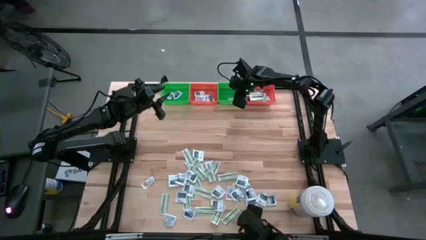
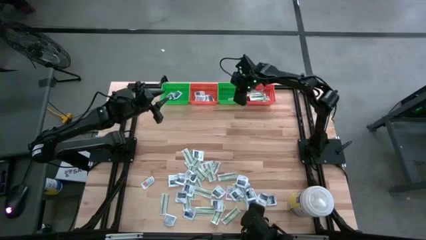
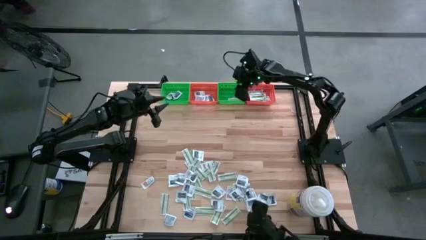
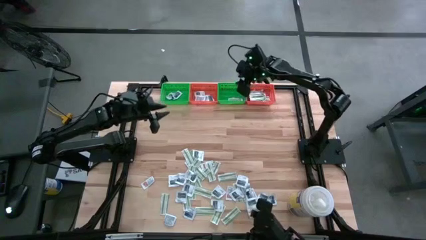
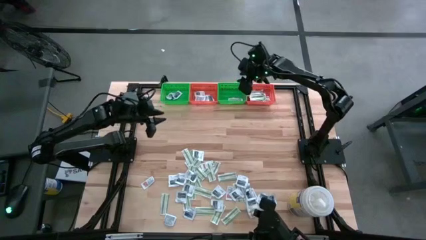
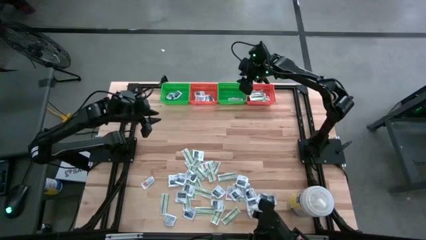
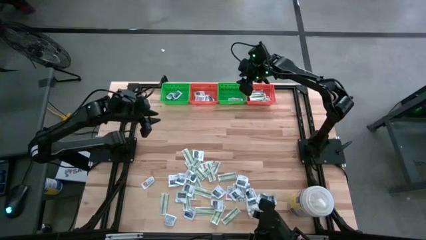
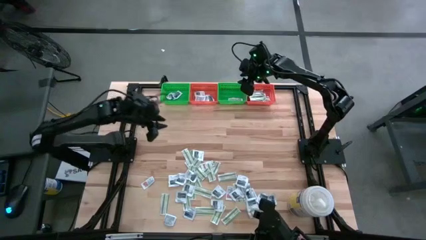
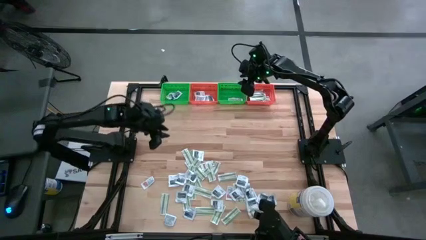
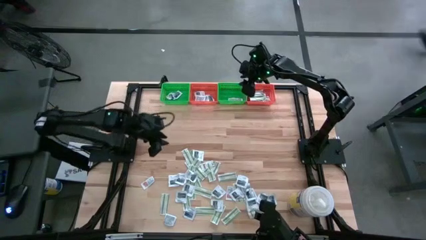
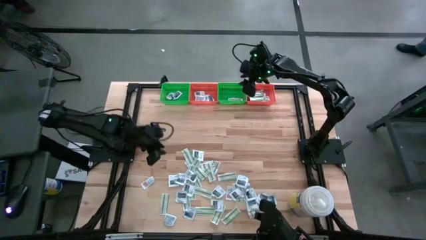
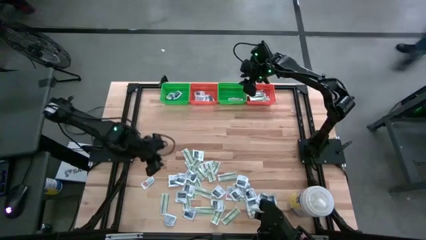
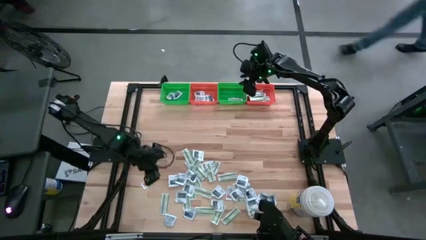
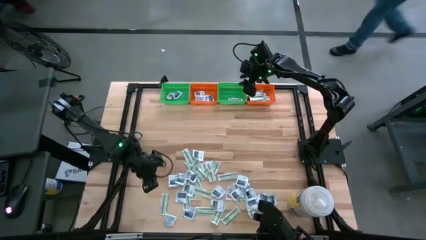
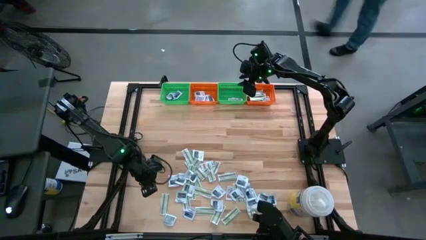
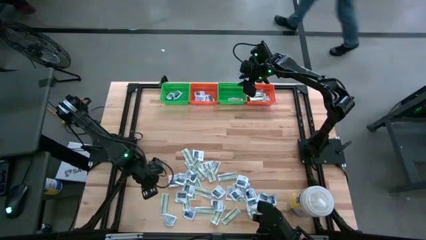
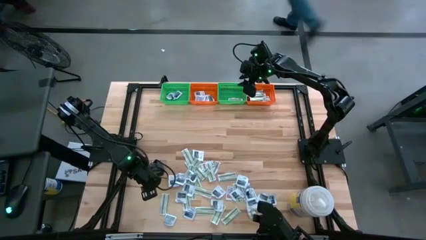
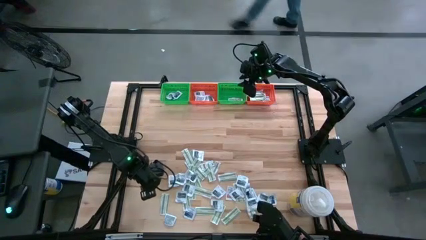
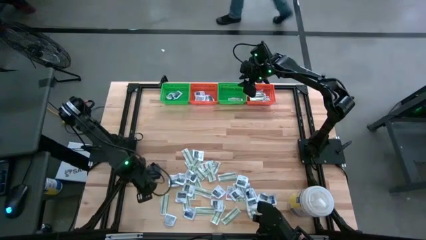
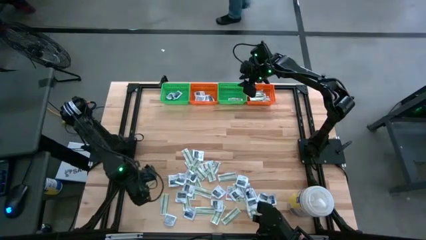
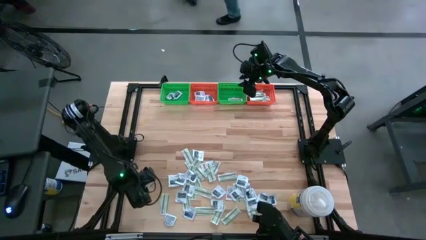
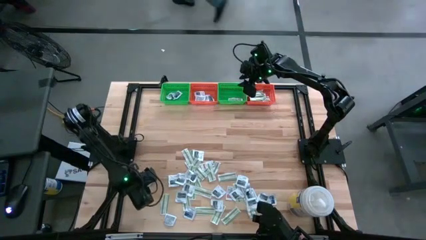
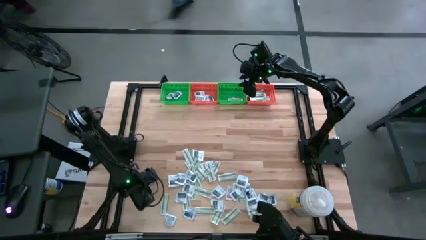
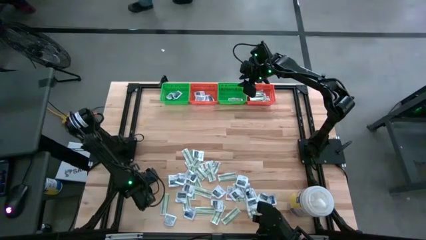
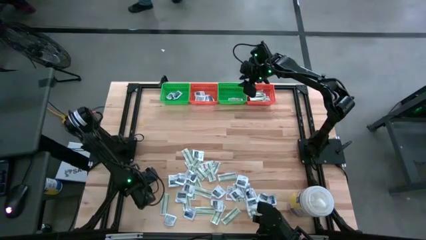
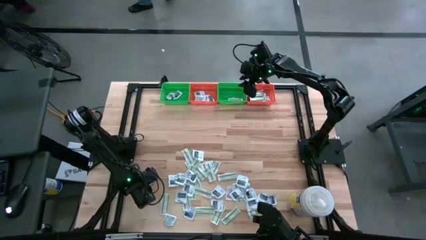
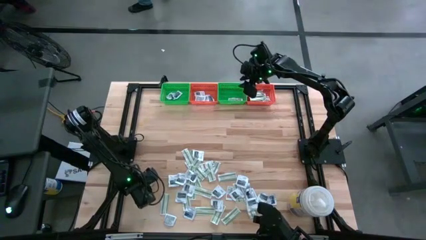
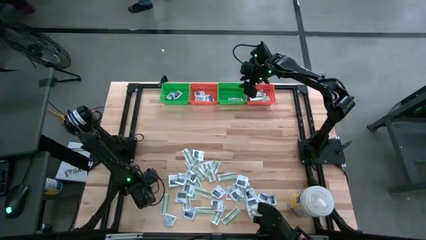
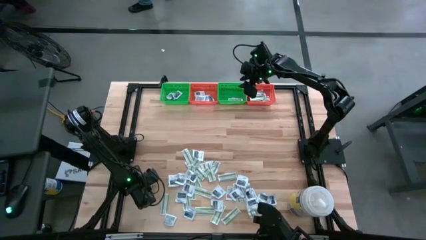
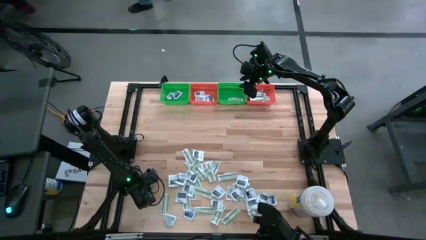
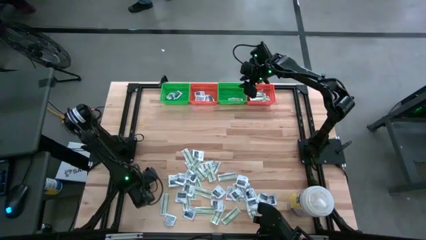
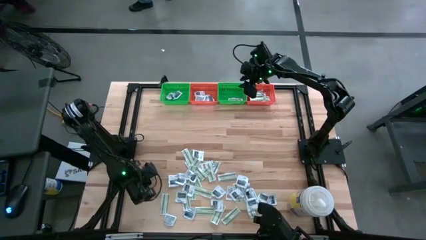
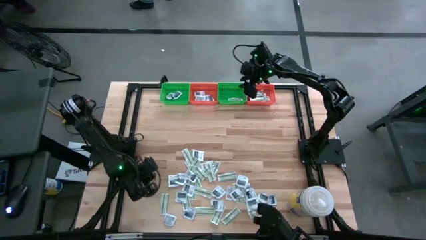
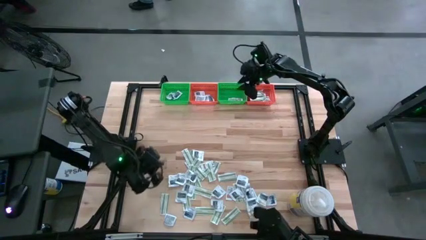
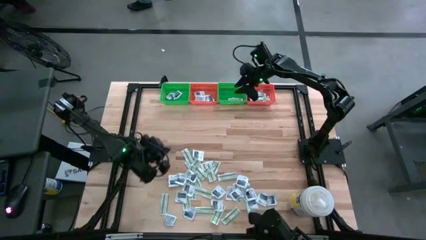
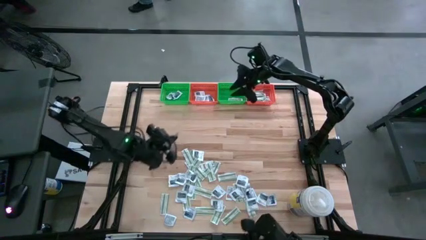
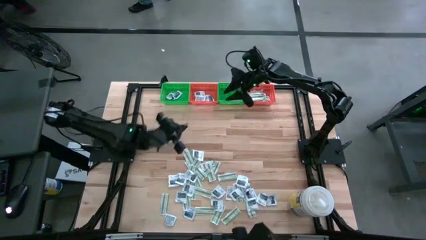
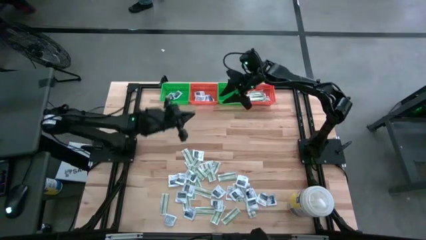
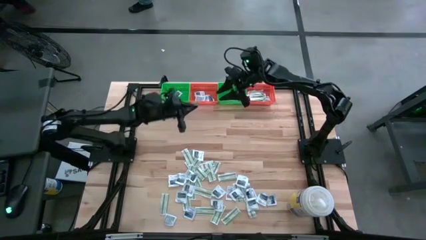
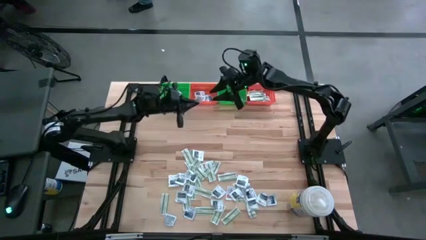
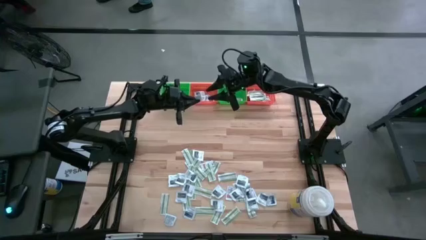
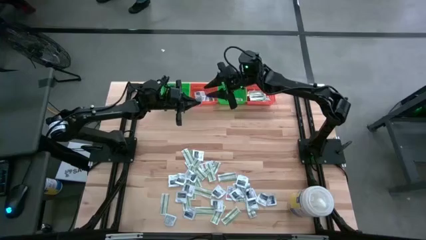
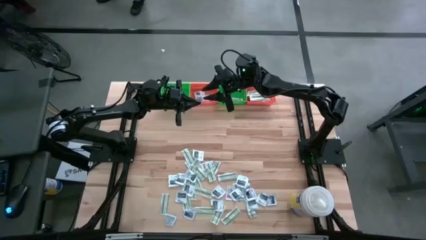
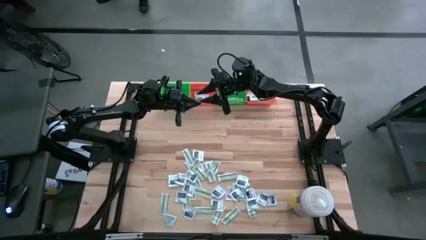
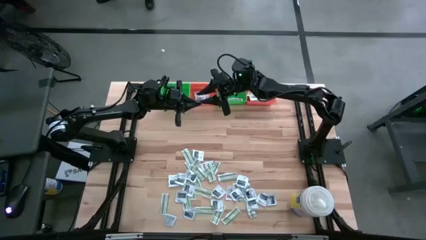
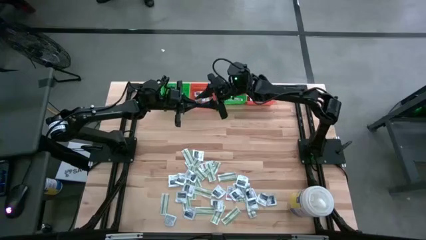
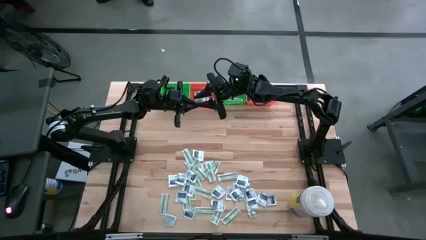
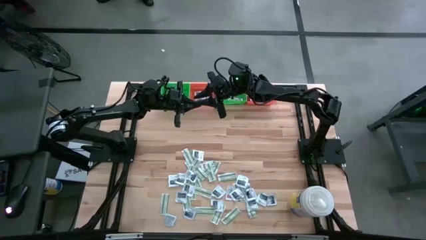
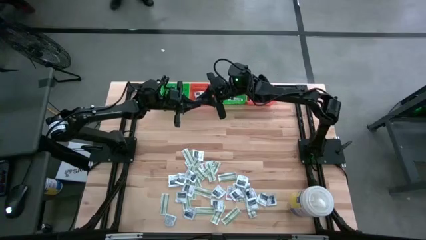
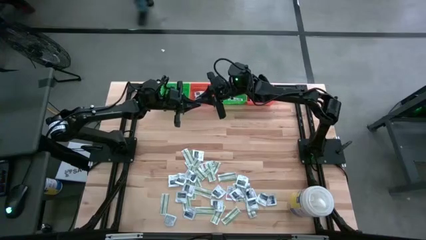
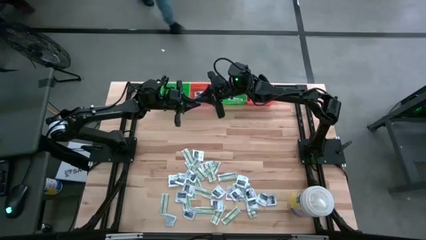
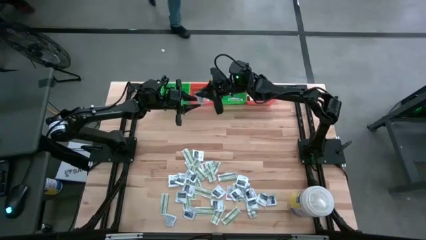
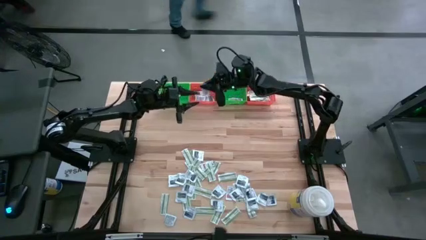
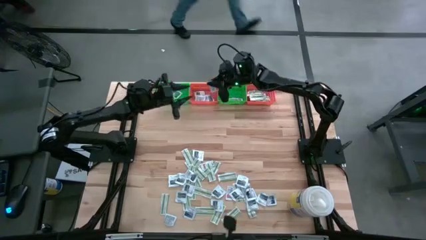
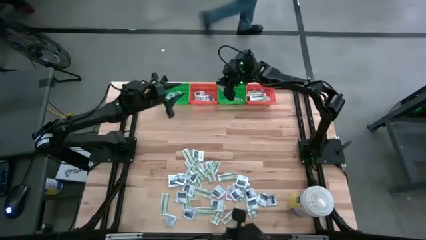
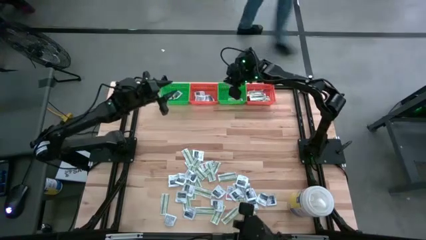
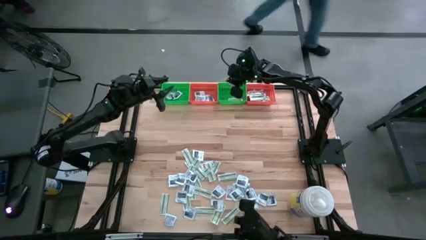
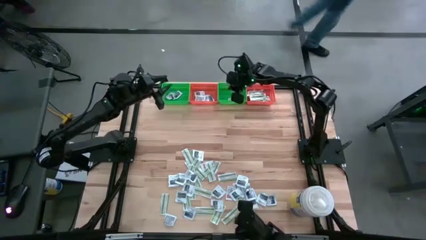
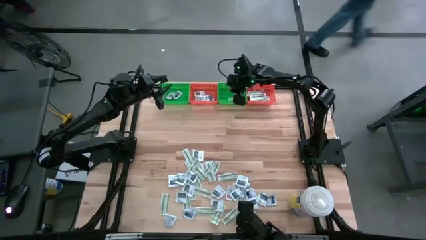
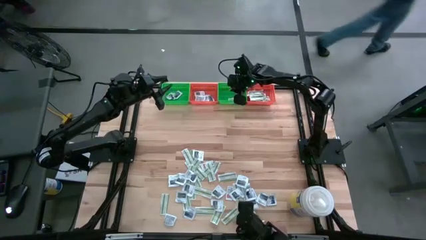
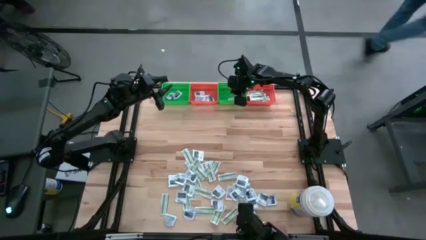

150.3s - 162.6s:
Task: Pick & Place First Aid Supplies
Put the orange ointment pack in the right green bin

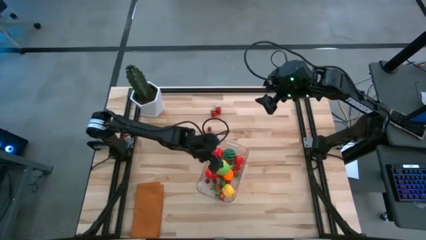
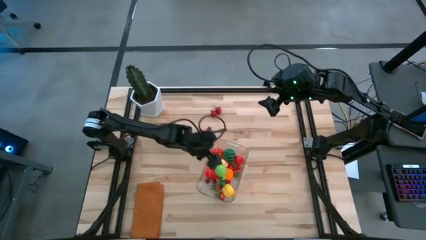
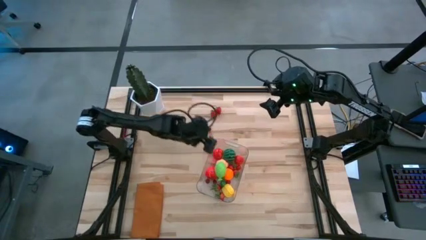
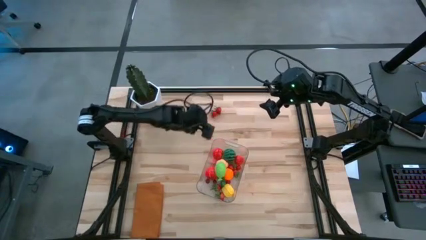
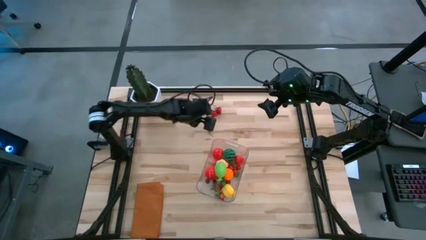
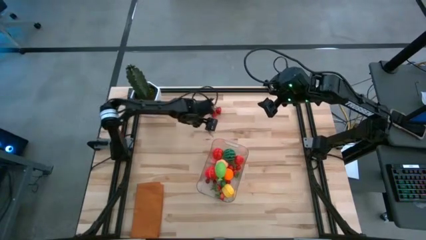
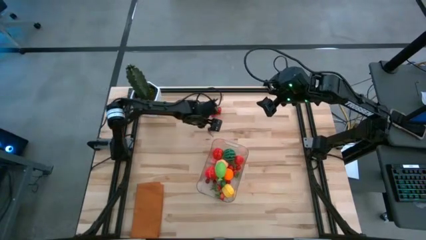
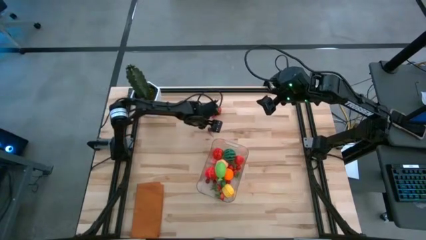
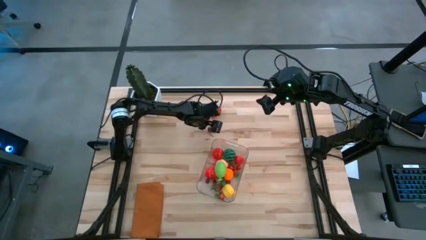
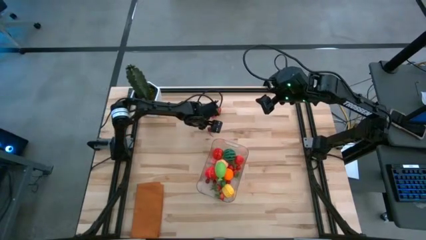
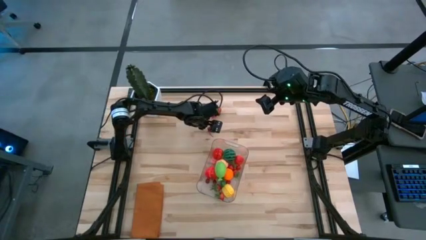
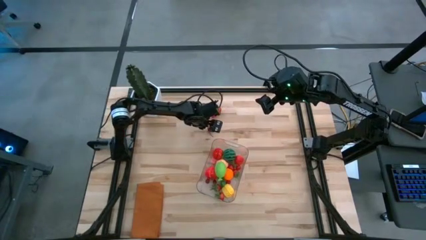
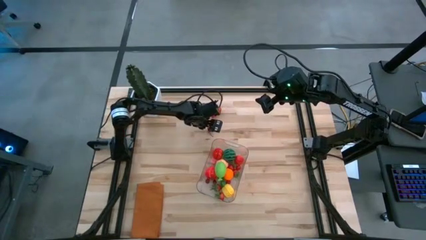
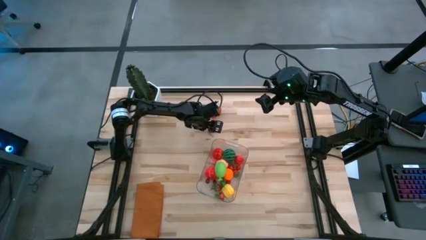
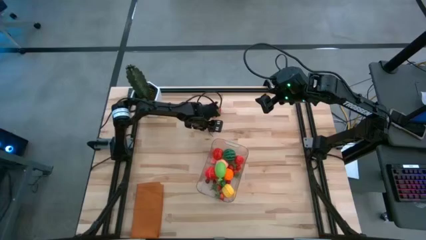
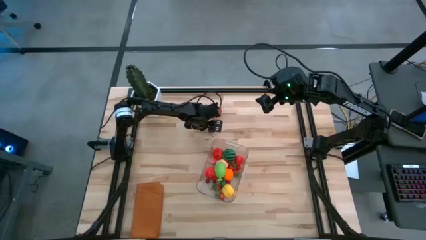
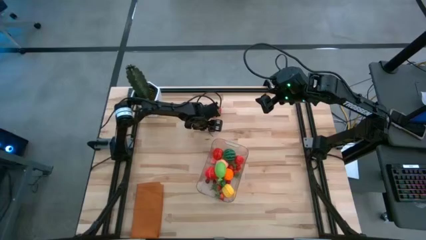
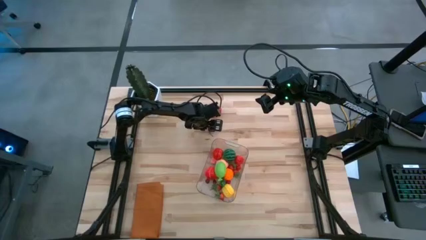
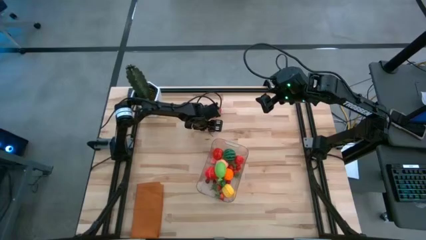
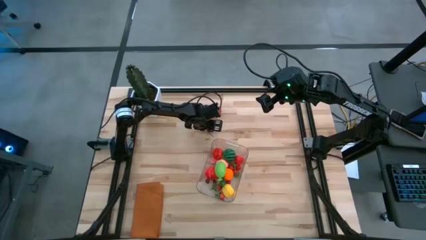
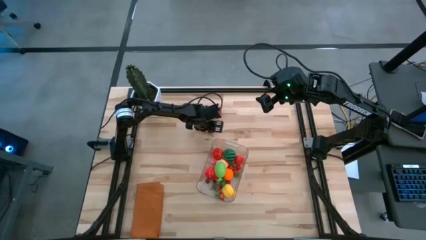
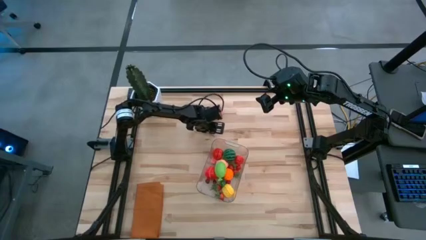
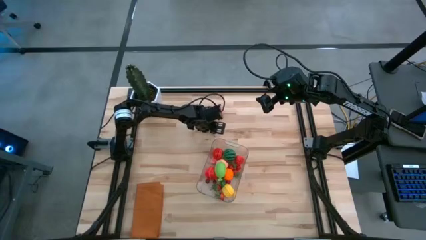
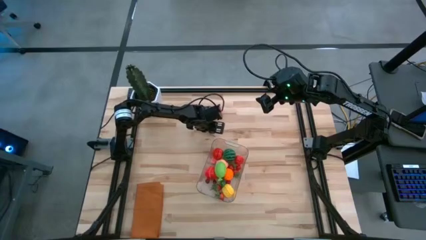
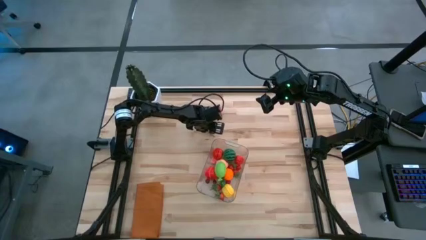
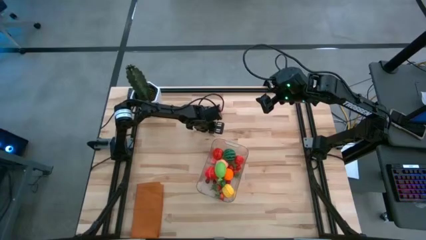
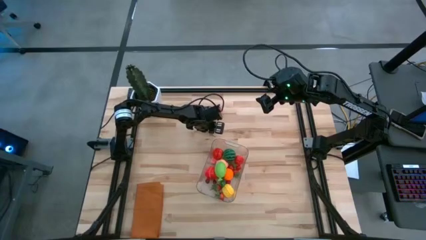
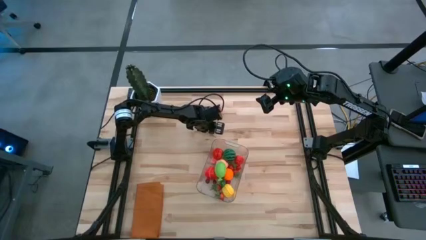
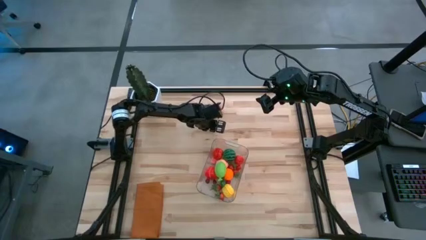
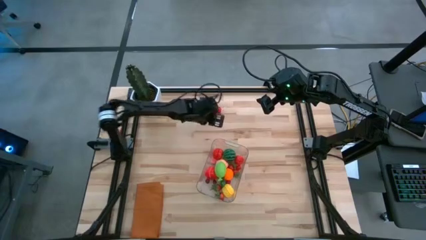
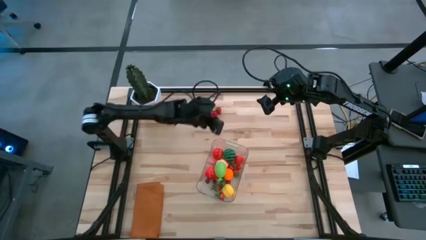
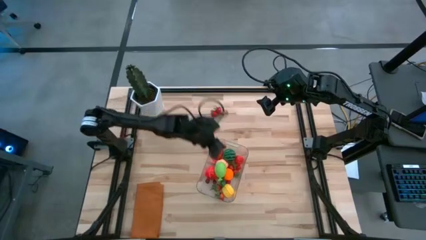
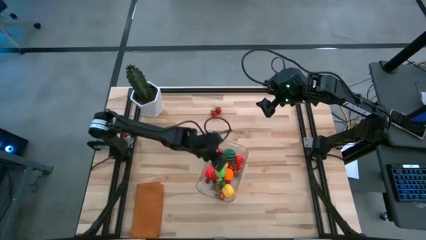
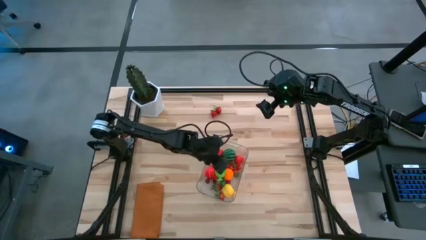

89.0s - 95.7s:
Task: Pick and placing Produce into tupperware
Put the red cherry into the transparent bin
